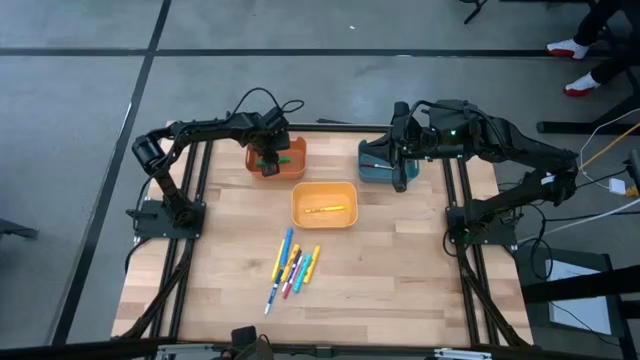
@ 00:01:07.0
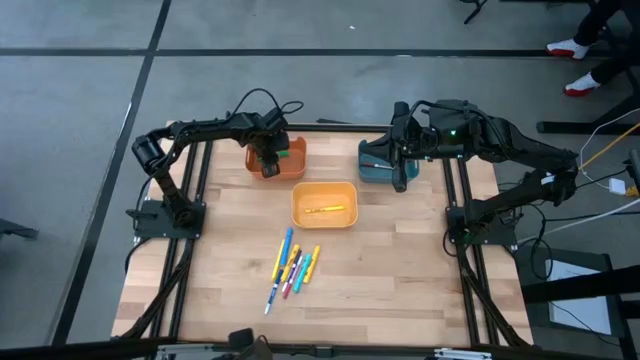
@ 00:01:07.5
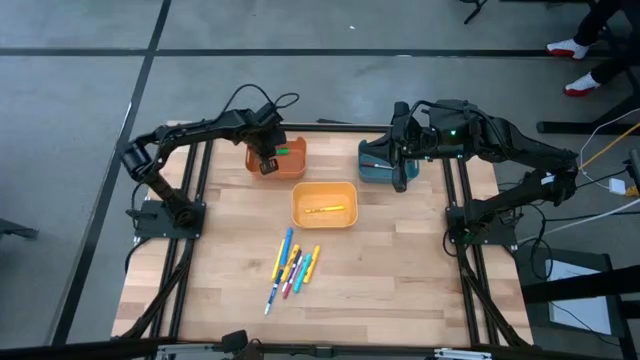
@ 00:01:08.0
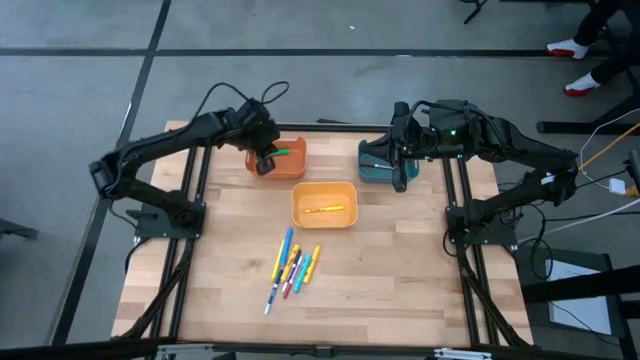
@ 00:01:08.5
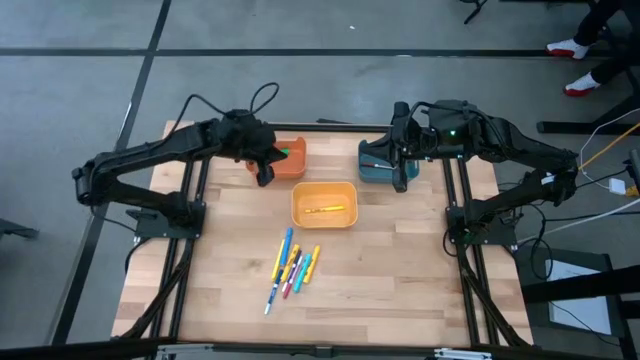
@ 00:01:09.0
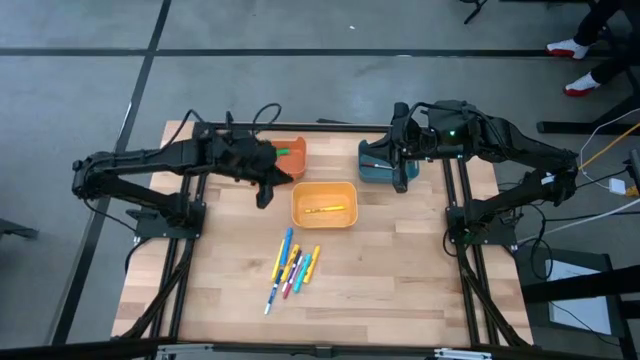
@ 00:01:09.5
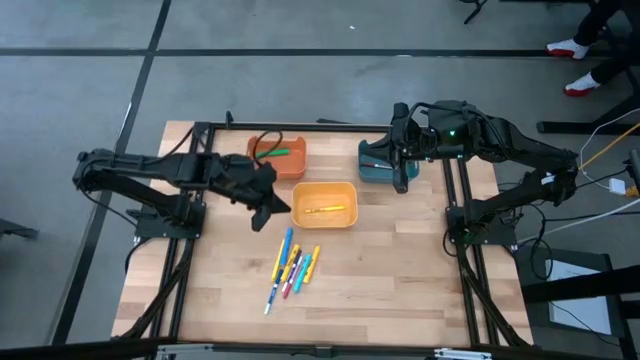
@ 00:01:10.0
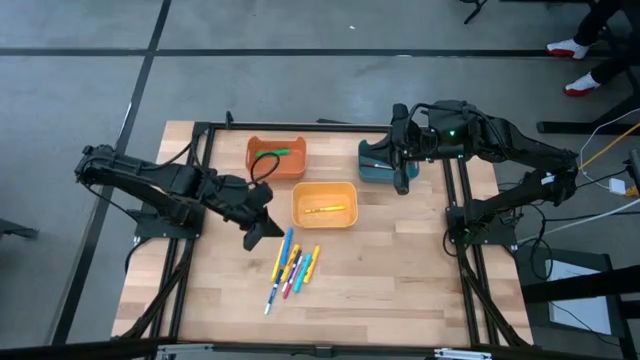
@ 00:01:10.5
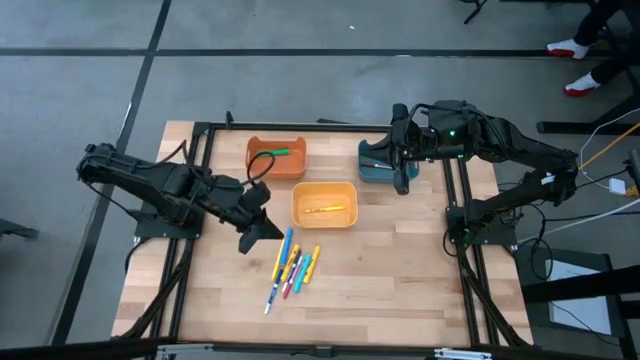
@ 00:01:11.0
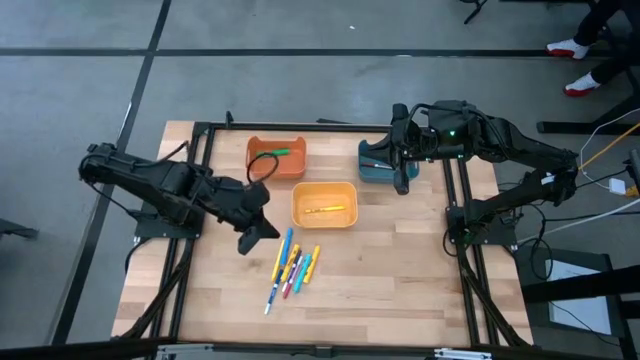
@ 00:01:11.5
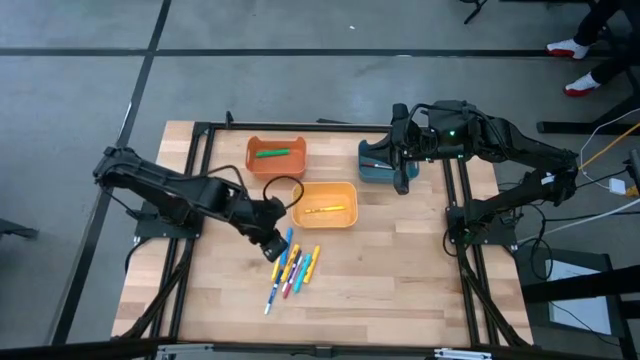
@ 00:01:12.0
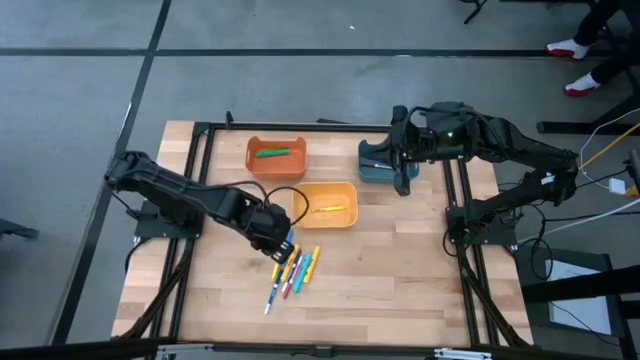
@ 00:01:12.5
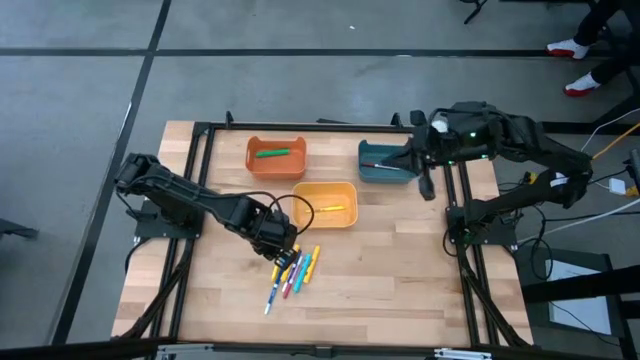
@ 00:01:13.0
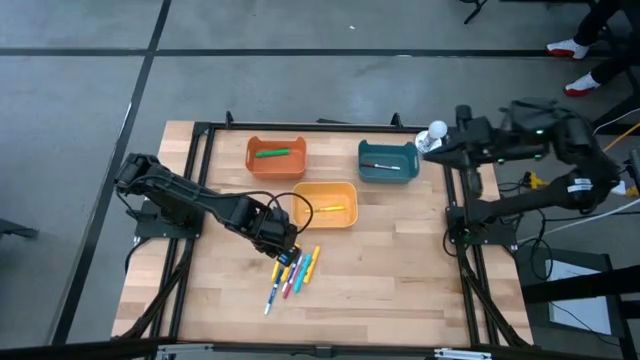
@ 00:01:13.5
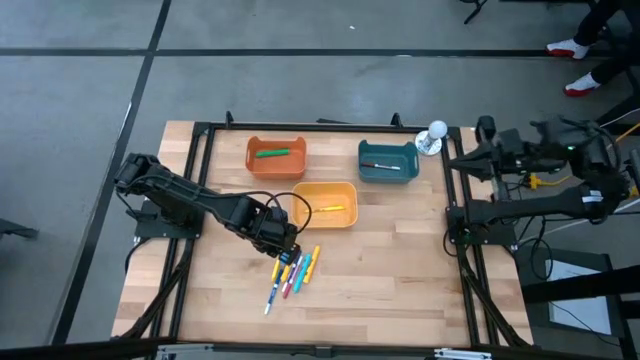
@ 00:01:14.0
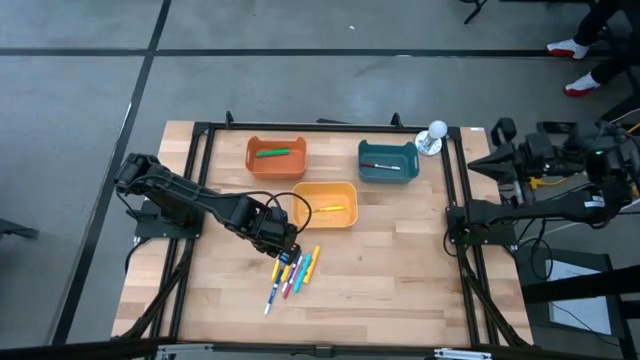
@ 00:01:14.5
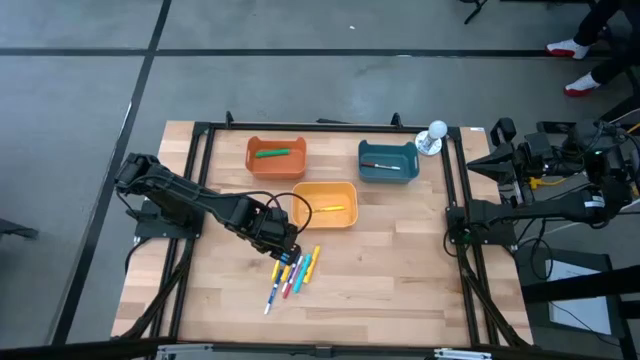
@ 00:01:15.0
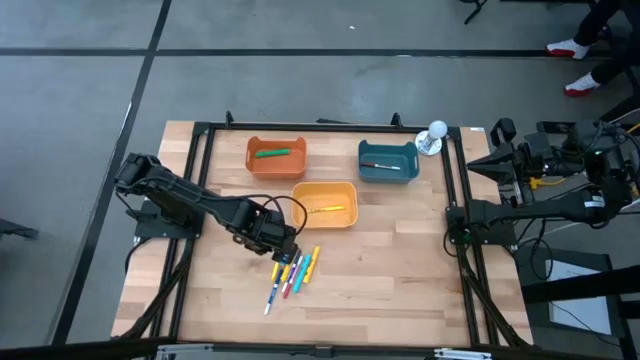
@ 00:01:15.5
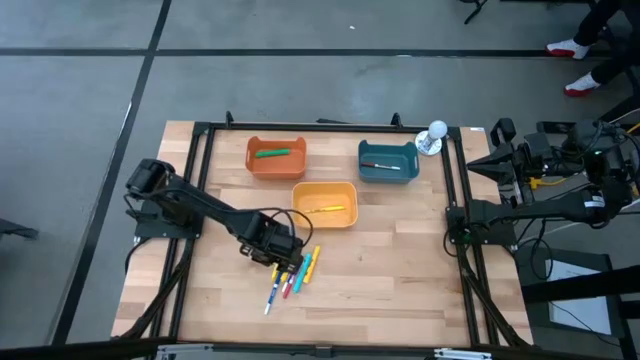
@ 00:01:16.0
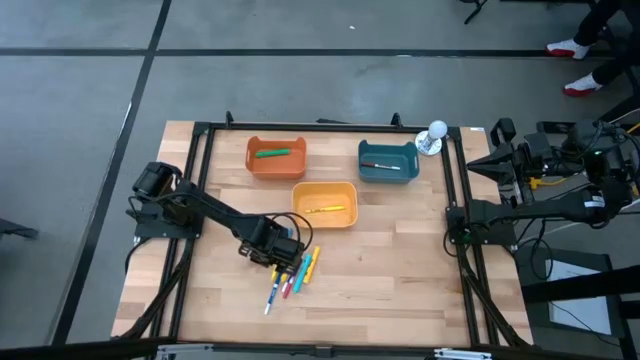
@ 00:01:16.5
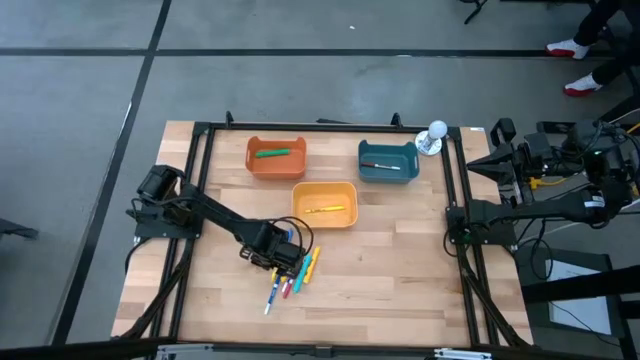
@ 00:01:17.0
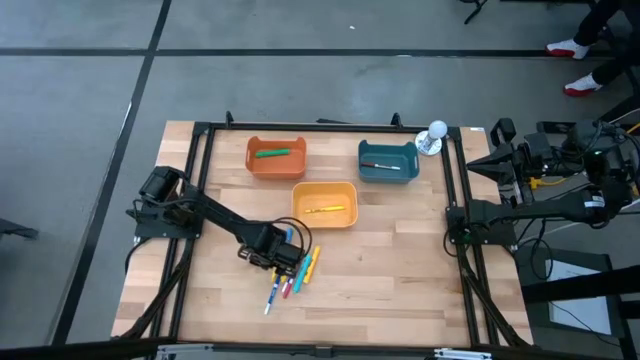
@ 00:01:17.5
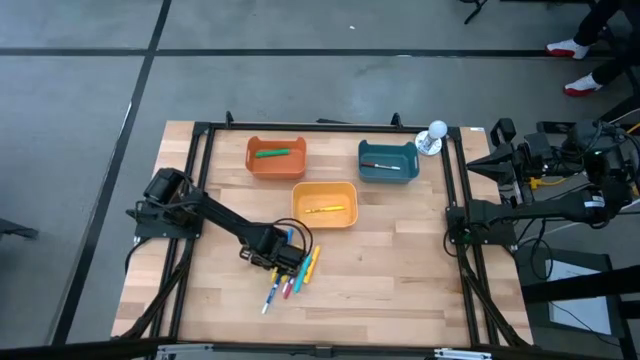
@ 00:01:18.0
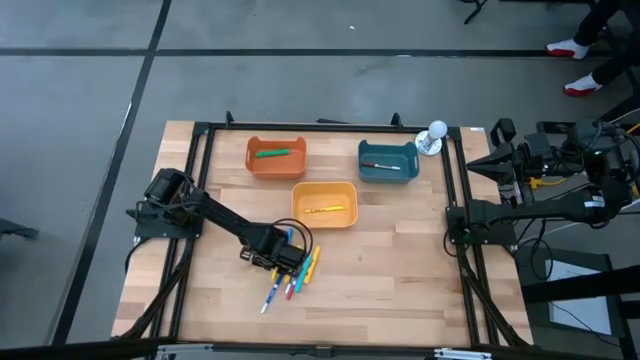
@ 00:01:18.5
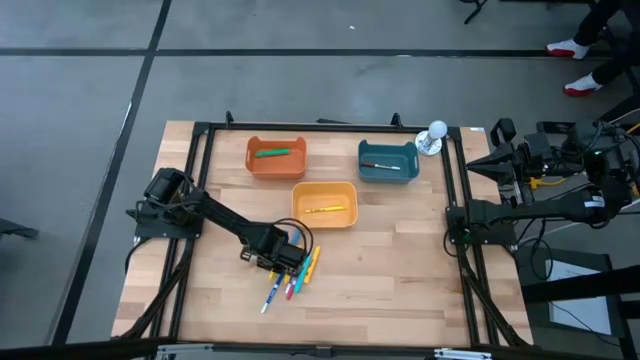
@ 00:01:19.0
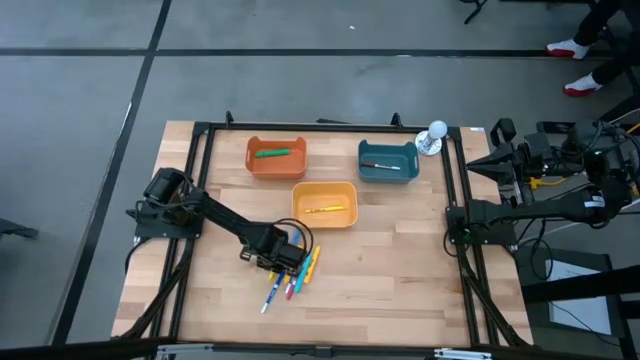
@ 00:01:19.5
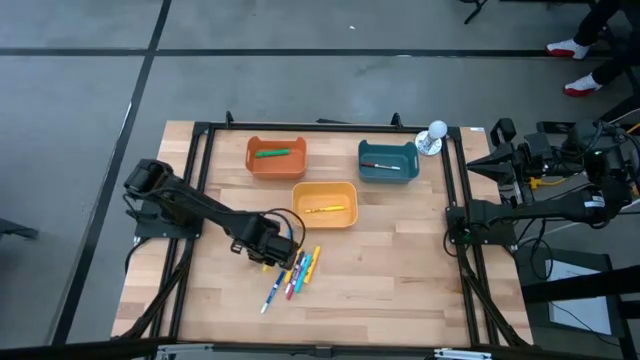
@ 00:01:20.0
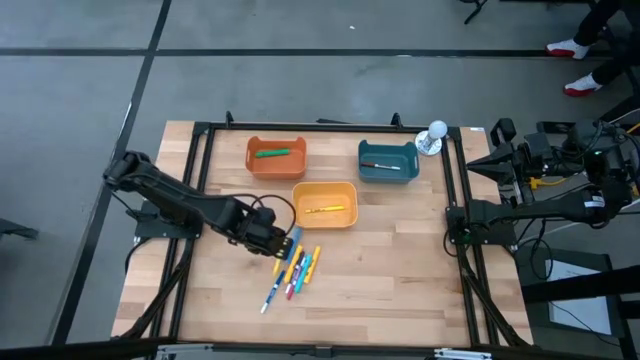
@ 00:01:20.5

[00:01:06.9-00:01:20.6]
Task: Pick & Place Markers
Put the small yellow highlighter into the yellow bin

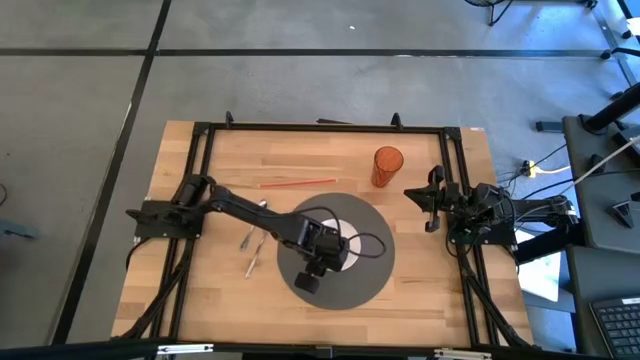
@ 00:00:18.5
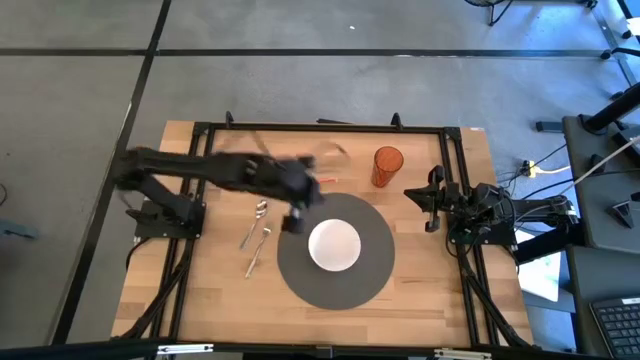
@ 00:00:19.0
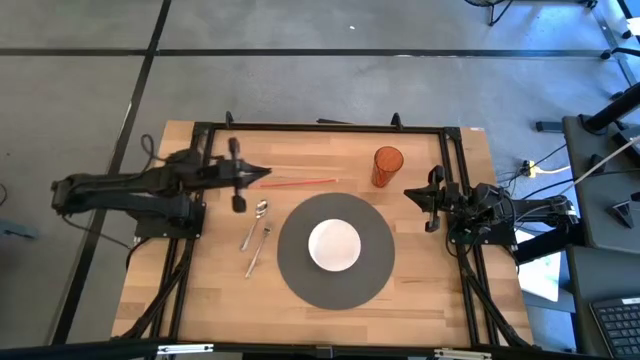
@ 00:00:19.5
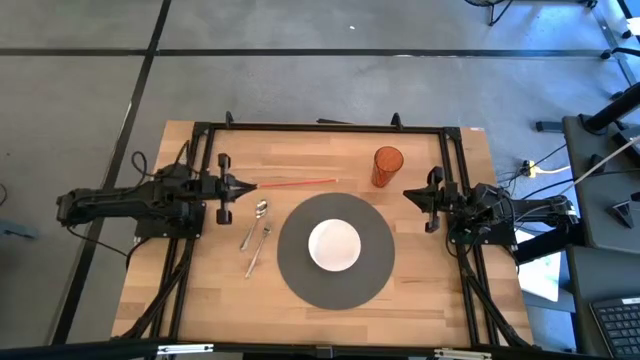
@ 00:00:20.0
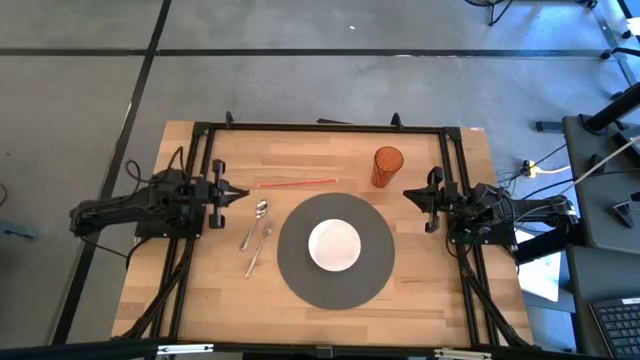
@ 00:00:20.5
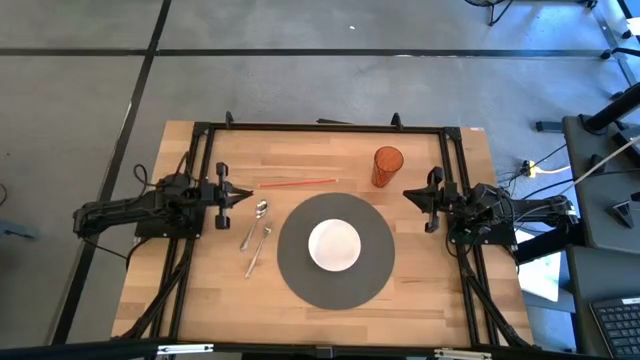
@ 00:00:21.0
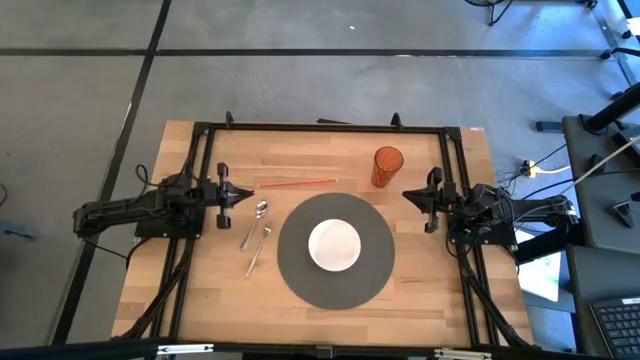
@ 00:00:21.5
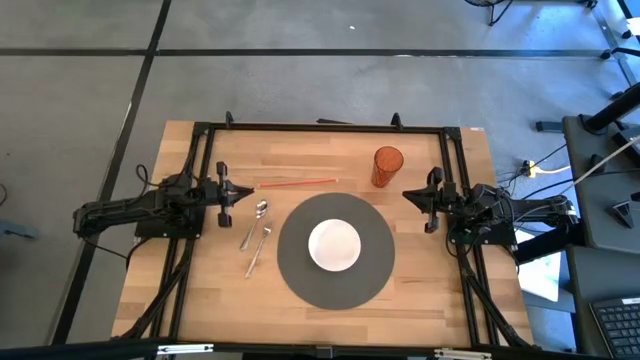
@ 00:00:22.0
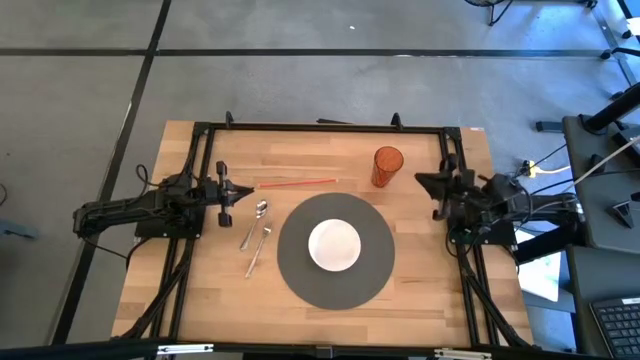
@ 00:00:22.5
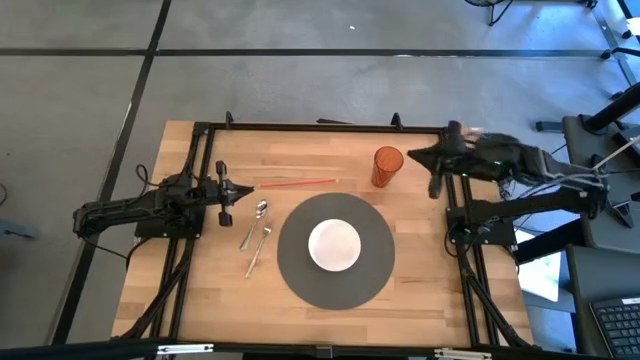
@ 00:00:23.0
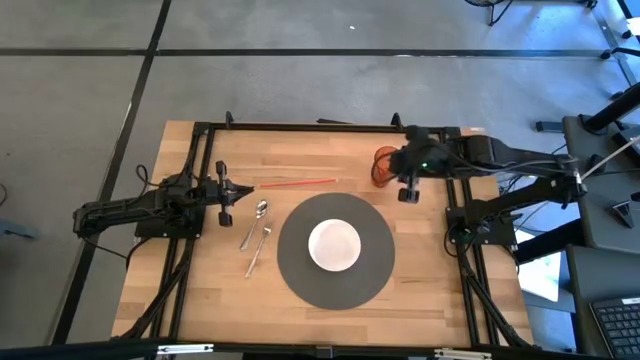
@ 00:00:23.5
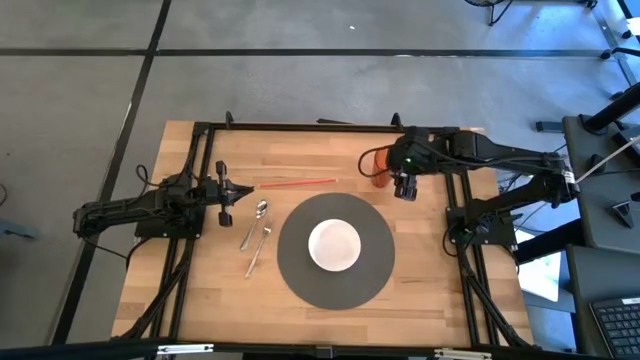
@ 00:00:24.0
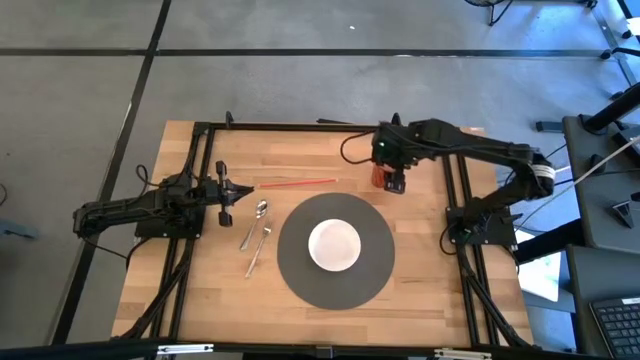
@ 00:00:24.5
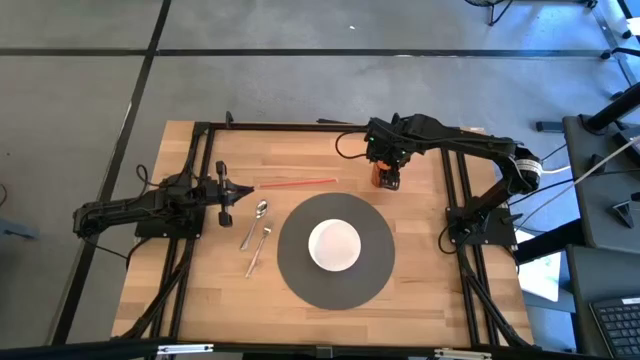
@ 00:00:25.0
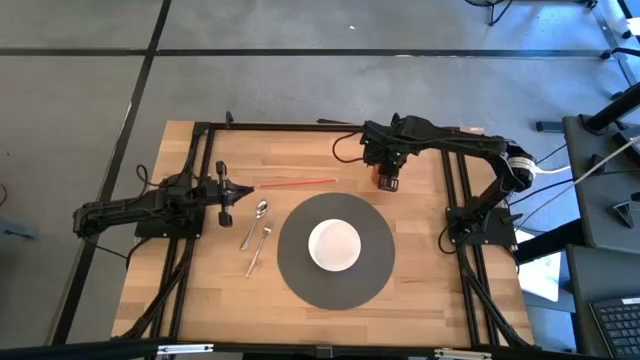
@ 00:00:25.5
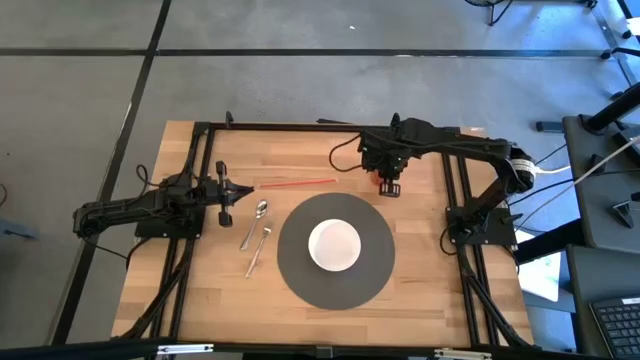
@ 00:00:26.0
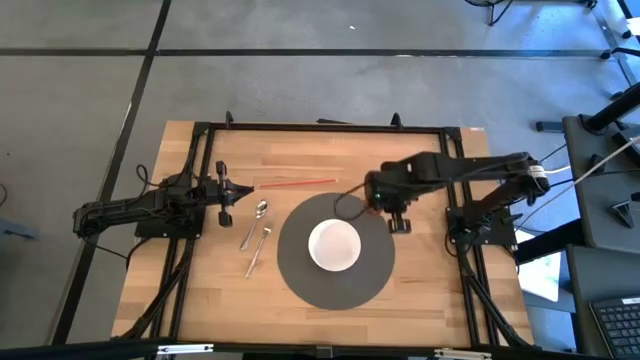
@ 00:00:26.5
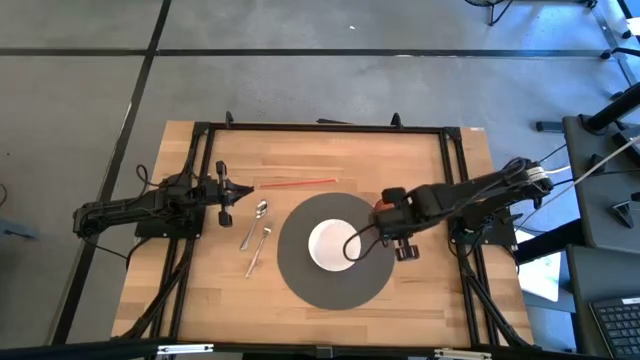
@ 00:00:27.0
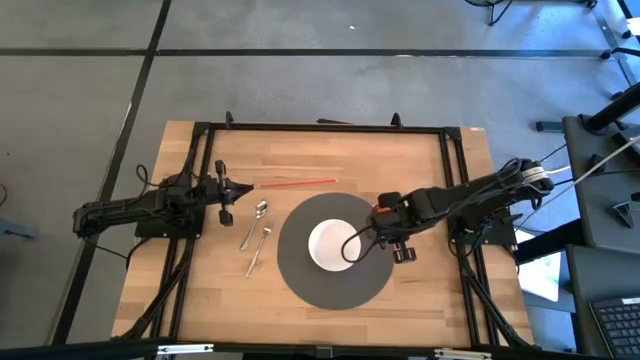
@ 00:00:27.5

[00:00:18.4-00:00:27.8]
Task: Pick & Place Utensil
Put the red cup on the gray mat to the top right of the white bowl
